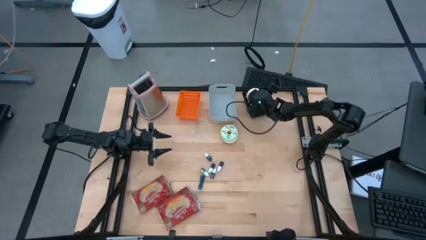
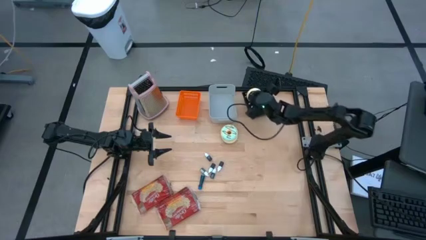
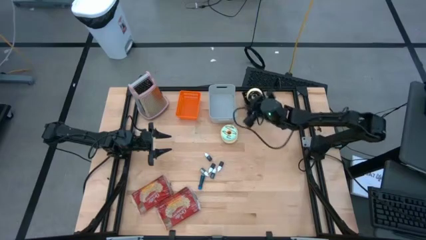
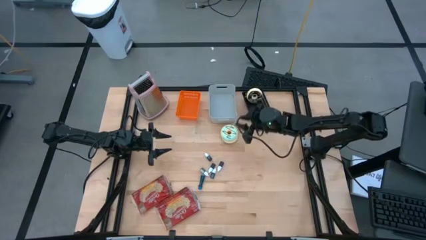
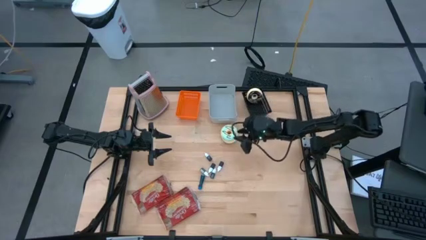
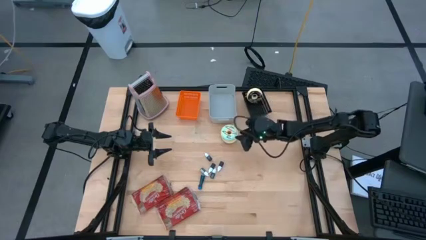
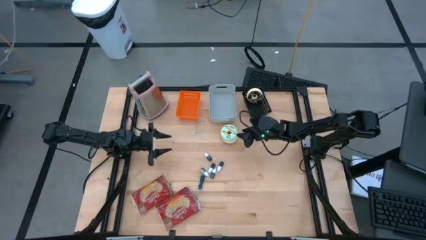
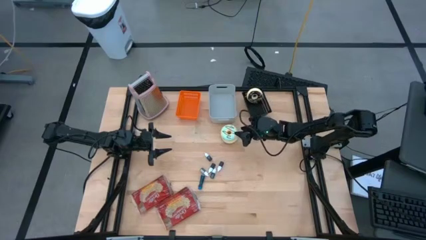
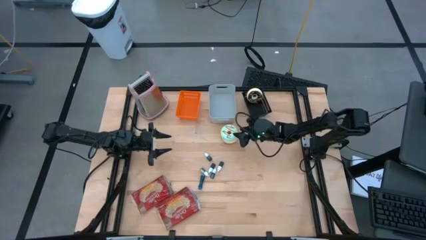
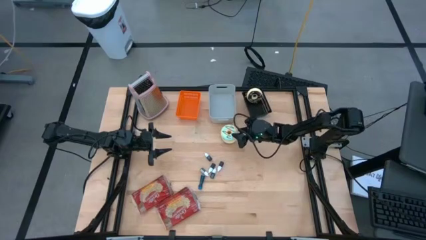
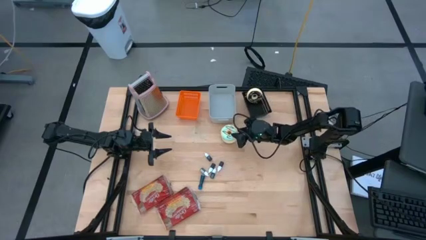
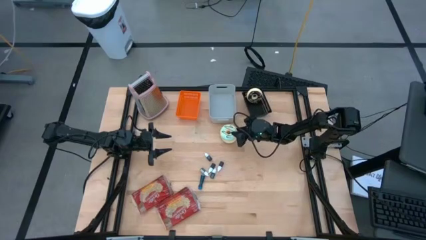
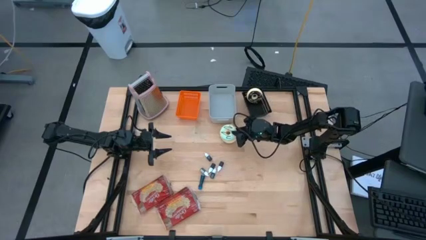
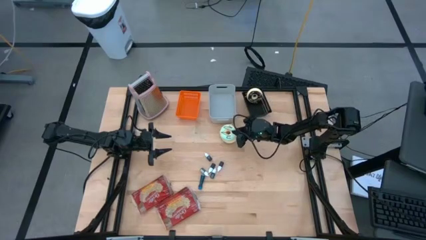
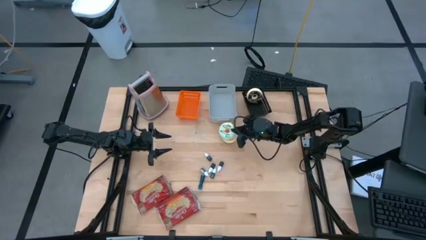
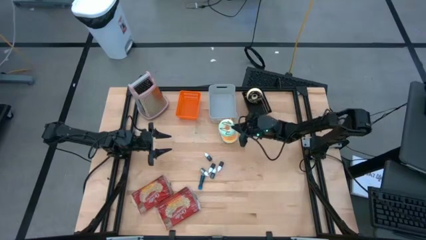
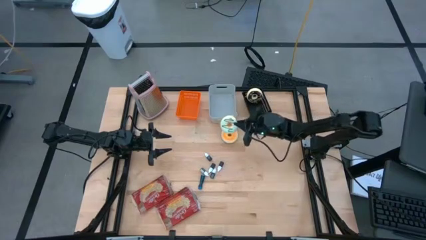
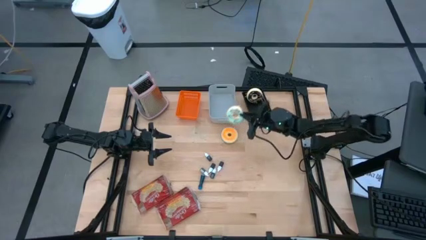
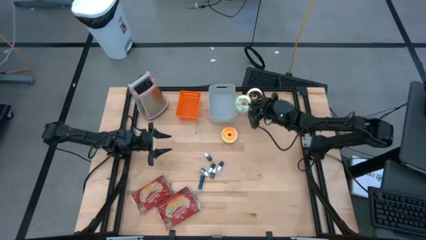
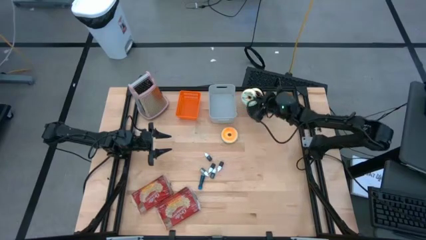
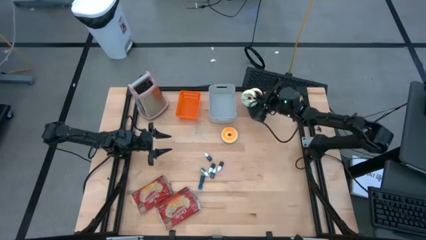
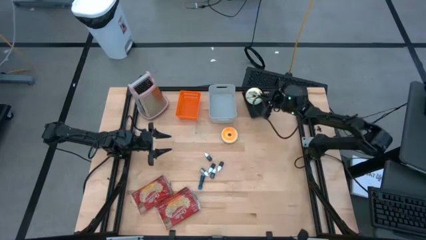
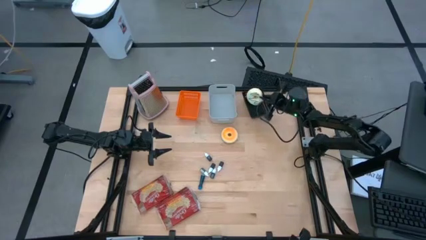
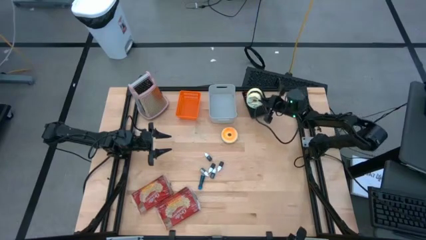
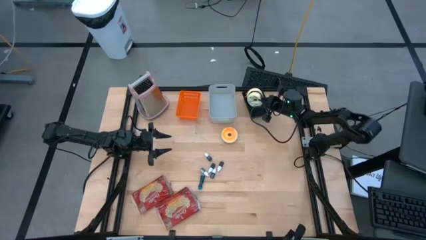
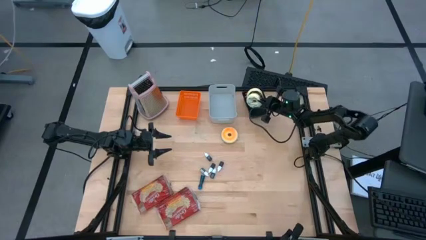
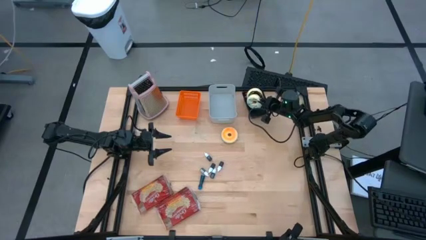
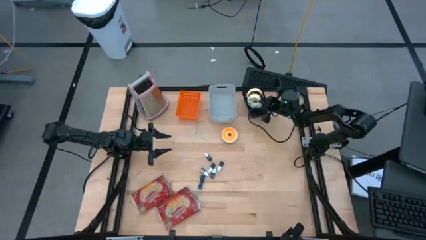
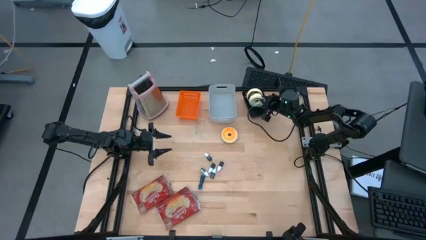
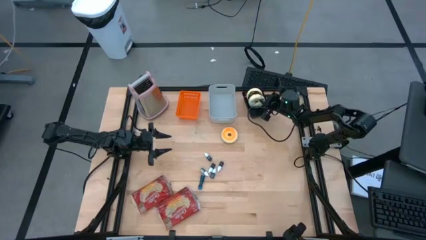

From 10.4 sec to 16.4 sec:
Put the light blue doughnut into the black bin

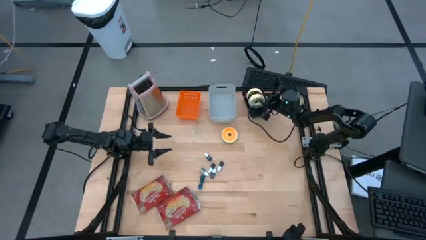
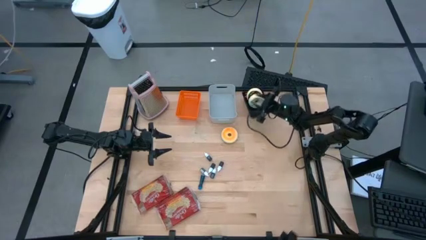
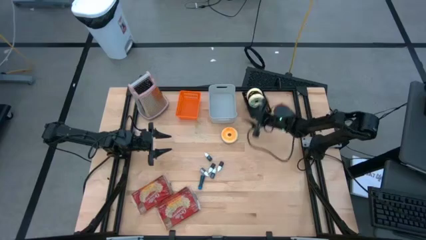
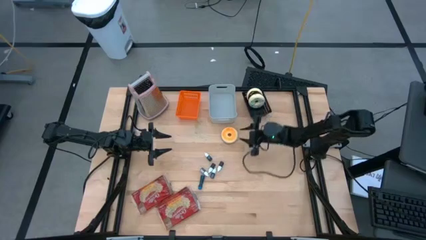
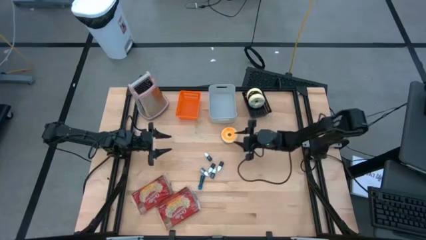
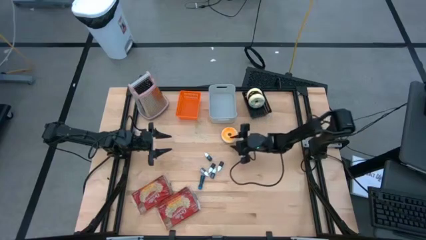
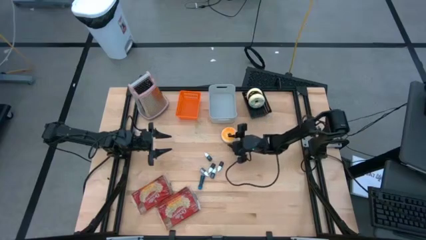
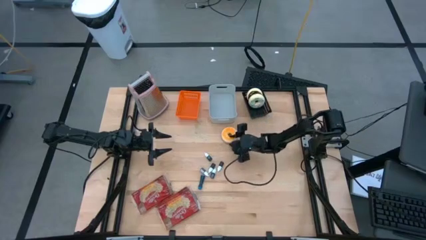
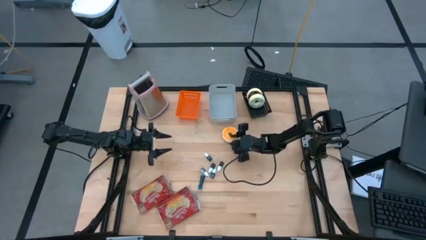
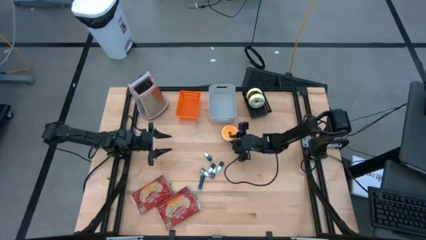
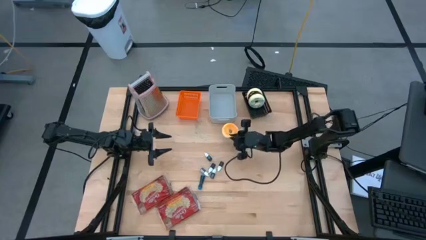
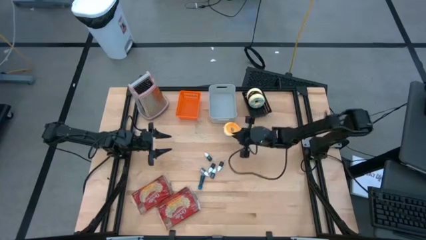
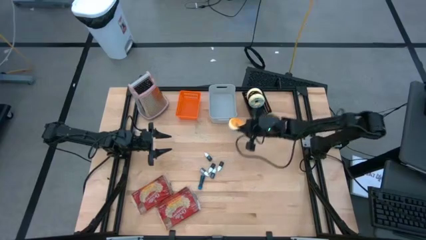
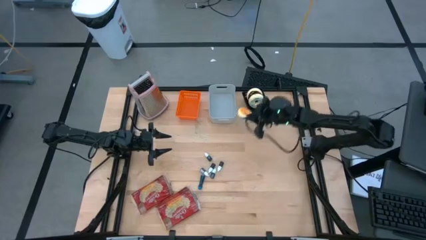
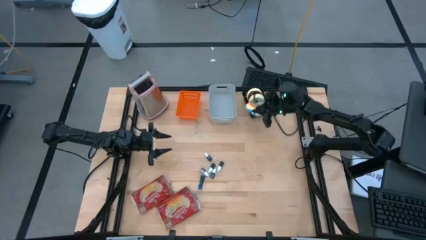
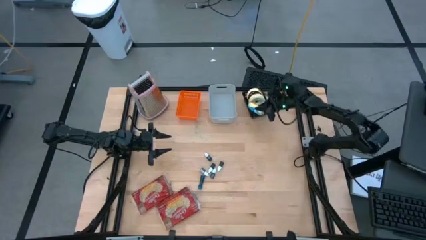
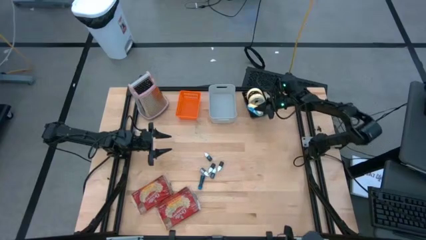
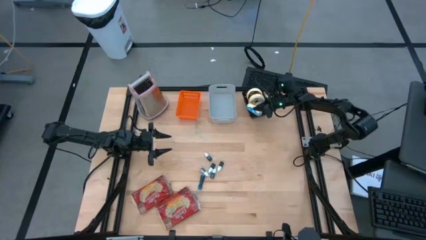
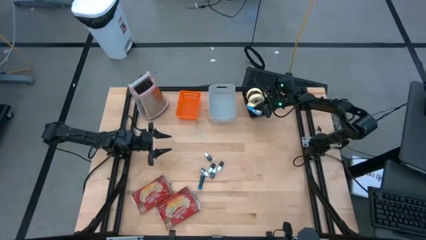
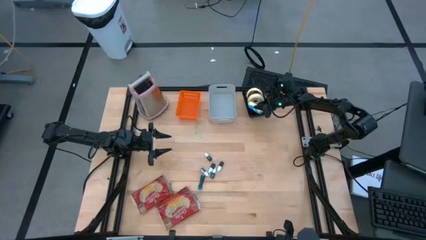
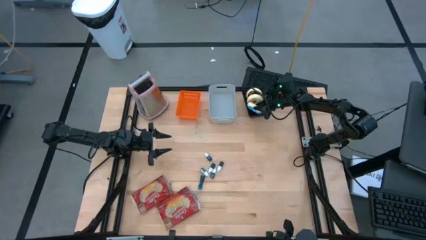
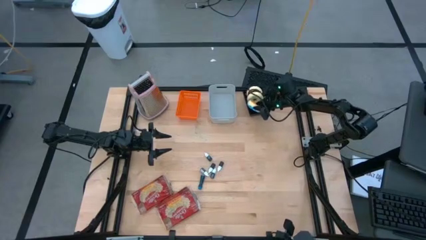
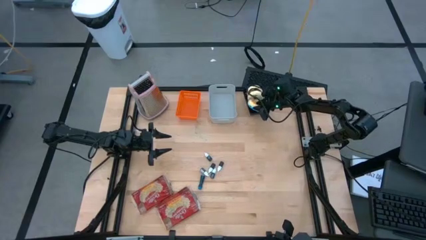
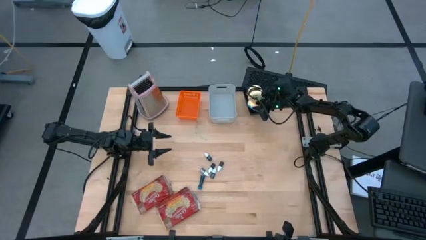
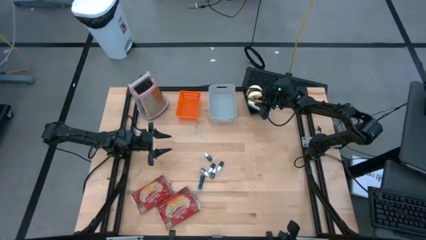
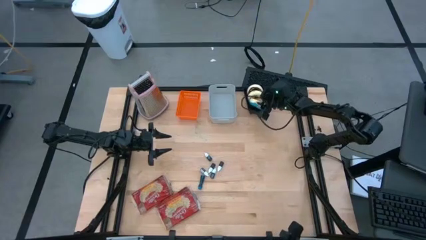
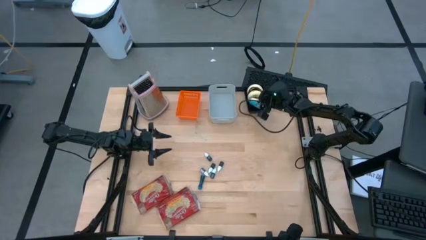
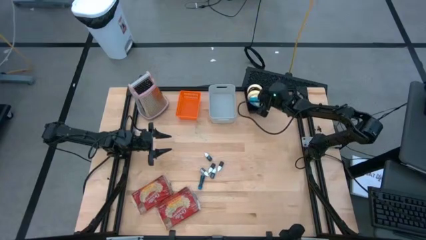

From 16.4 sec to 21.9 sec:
Put the blue doughnut into the black bin
